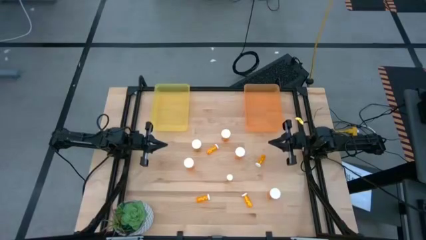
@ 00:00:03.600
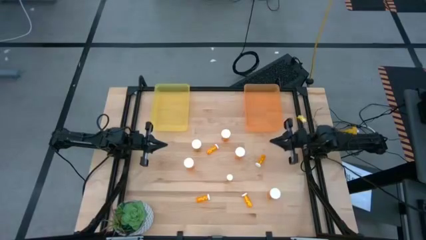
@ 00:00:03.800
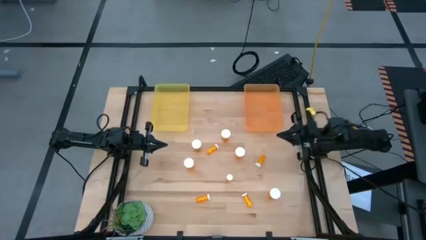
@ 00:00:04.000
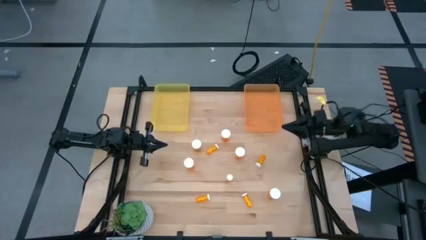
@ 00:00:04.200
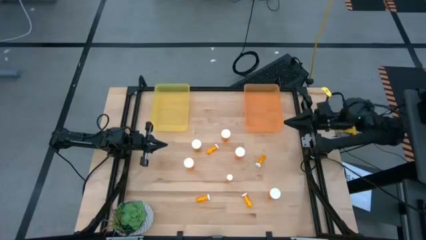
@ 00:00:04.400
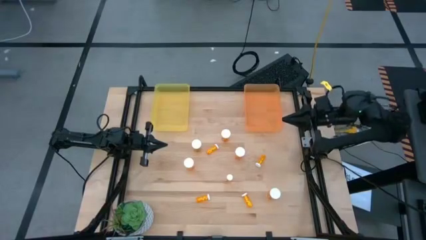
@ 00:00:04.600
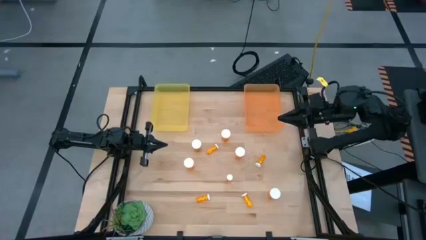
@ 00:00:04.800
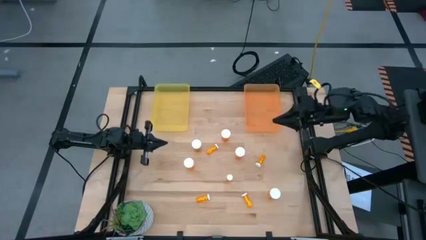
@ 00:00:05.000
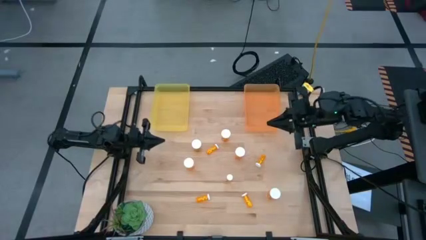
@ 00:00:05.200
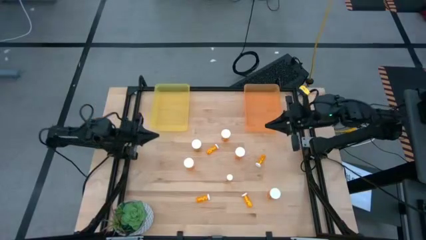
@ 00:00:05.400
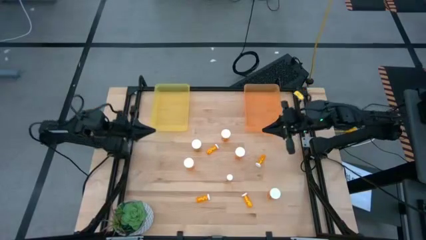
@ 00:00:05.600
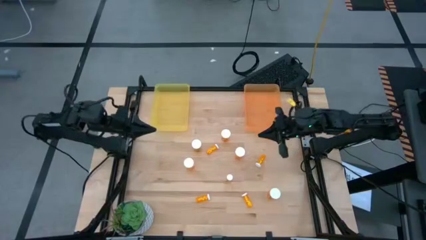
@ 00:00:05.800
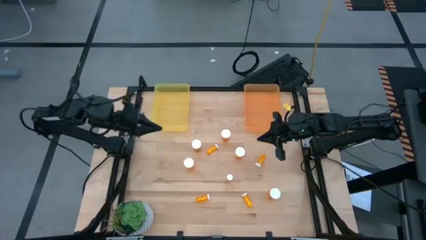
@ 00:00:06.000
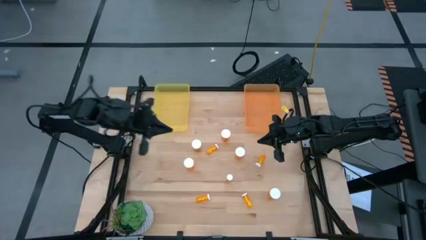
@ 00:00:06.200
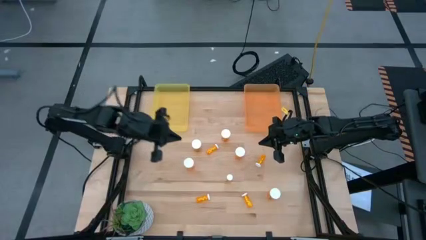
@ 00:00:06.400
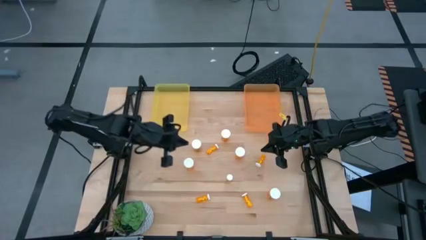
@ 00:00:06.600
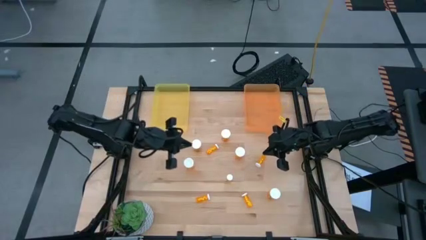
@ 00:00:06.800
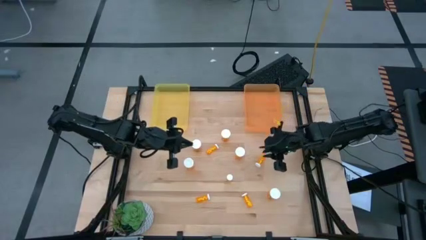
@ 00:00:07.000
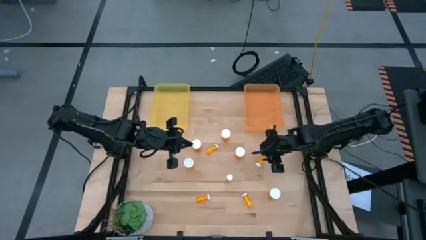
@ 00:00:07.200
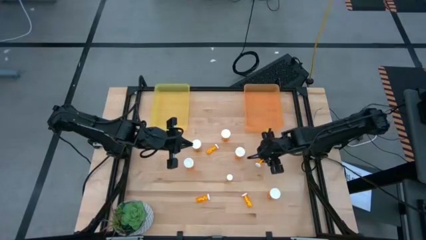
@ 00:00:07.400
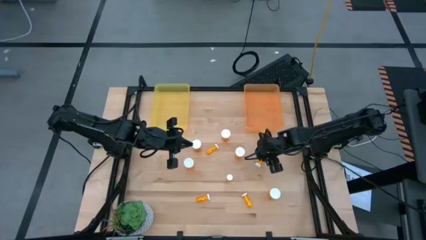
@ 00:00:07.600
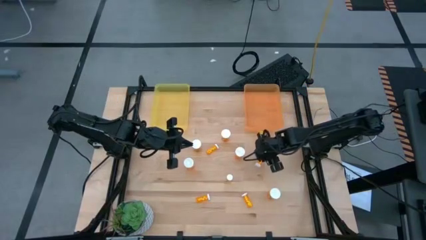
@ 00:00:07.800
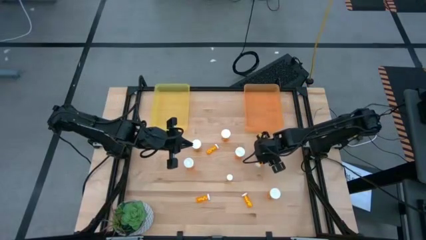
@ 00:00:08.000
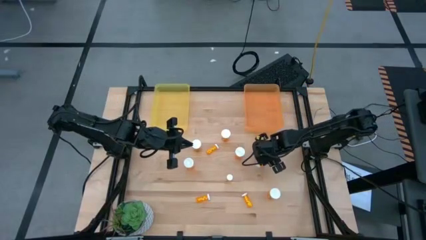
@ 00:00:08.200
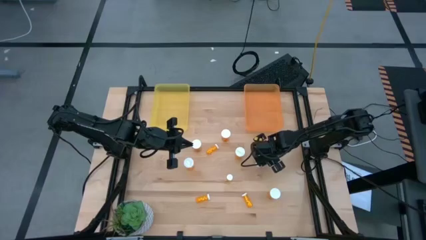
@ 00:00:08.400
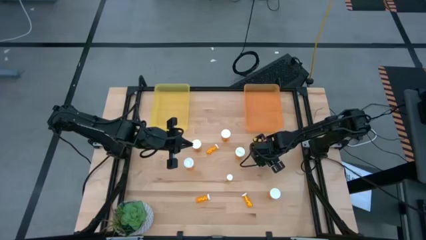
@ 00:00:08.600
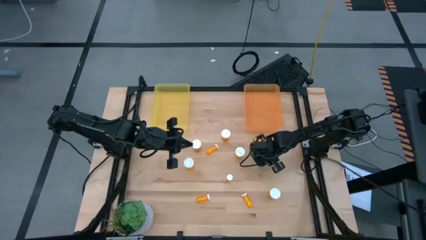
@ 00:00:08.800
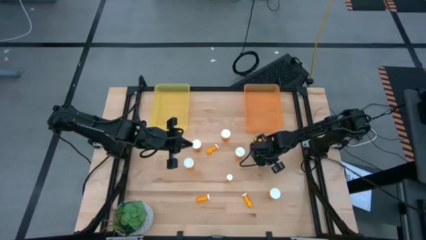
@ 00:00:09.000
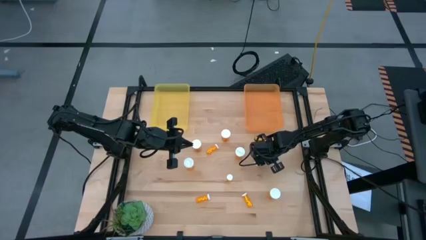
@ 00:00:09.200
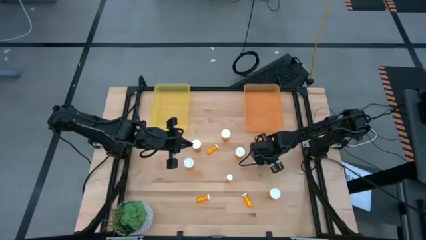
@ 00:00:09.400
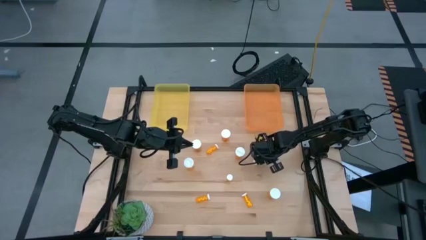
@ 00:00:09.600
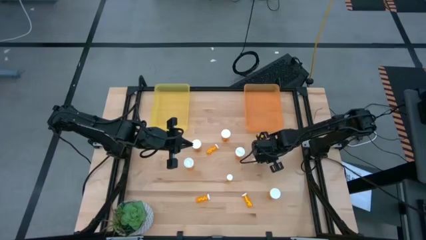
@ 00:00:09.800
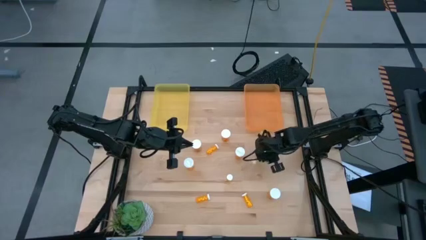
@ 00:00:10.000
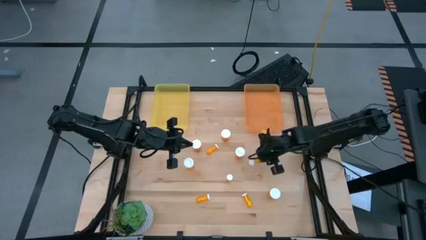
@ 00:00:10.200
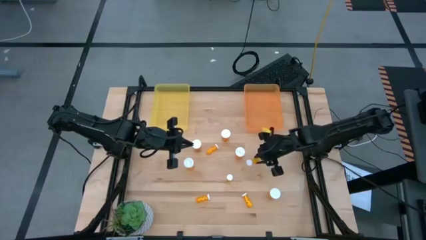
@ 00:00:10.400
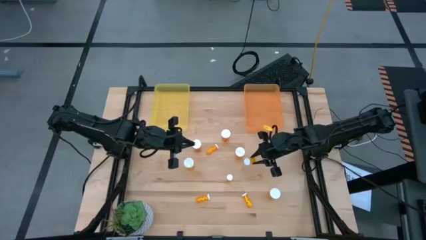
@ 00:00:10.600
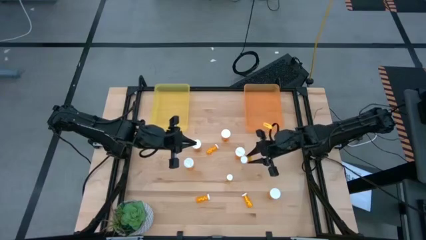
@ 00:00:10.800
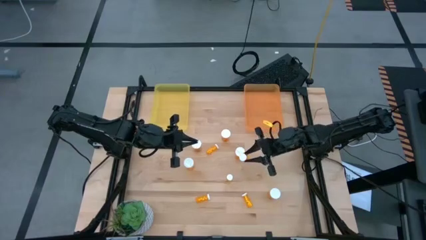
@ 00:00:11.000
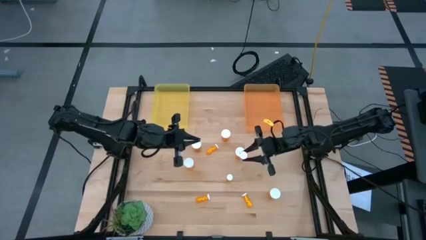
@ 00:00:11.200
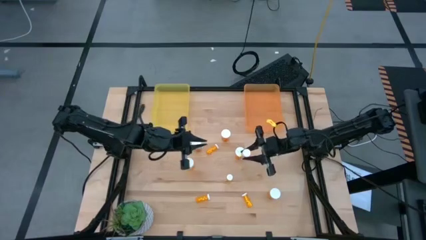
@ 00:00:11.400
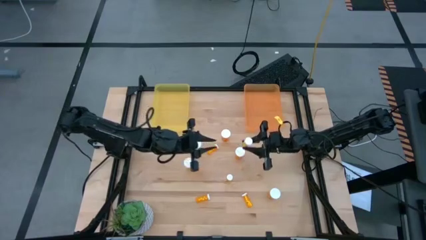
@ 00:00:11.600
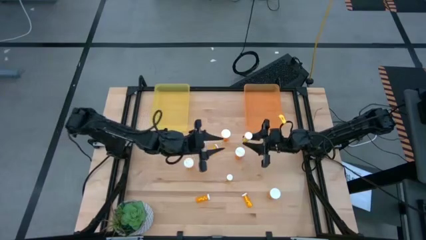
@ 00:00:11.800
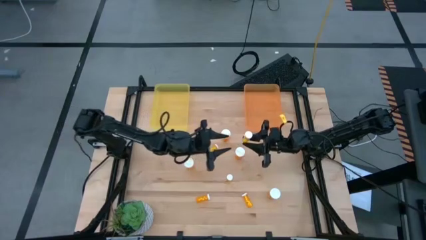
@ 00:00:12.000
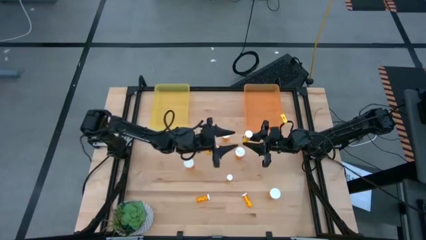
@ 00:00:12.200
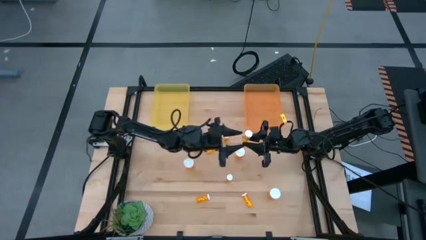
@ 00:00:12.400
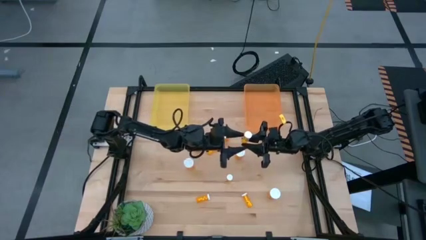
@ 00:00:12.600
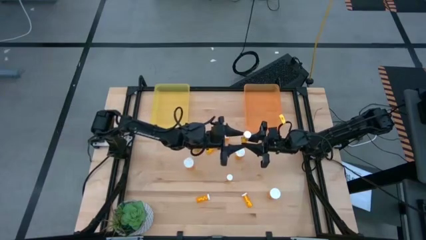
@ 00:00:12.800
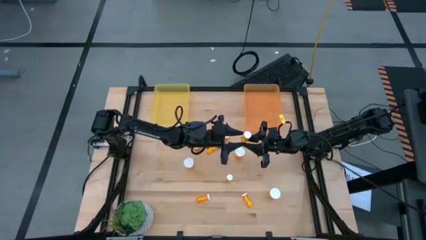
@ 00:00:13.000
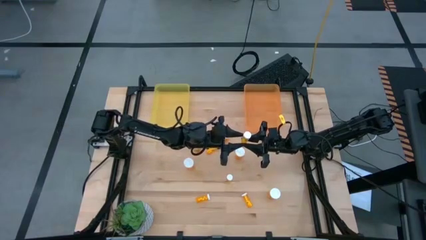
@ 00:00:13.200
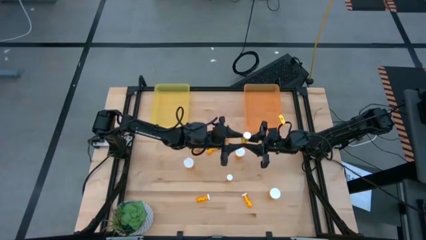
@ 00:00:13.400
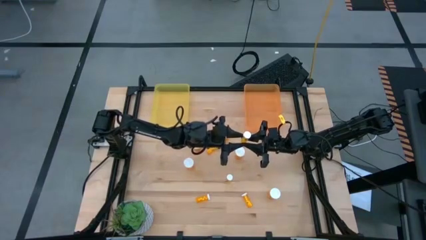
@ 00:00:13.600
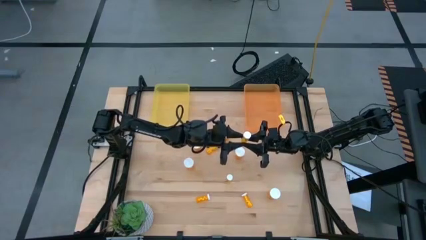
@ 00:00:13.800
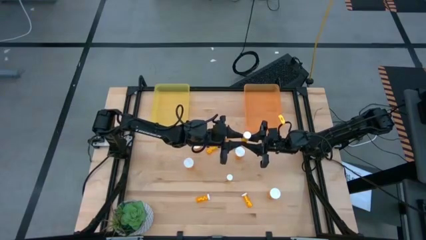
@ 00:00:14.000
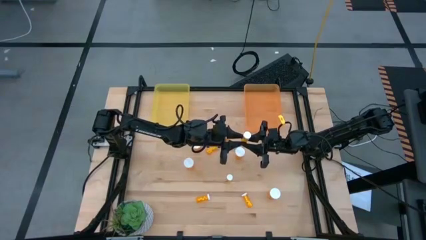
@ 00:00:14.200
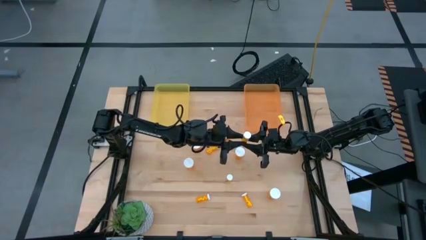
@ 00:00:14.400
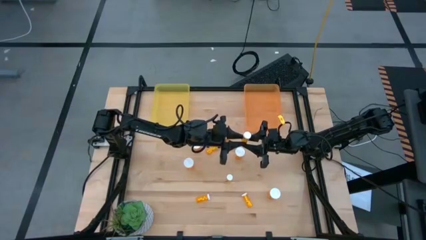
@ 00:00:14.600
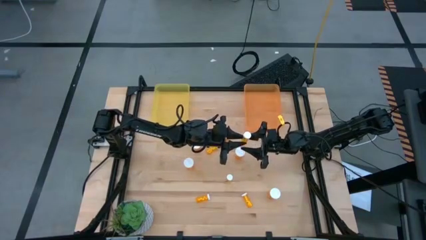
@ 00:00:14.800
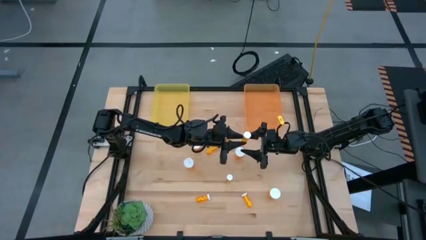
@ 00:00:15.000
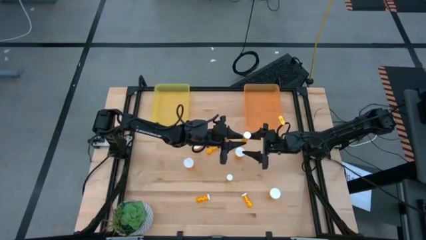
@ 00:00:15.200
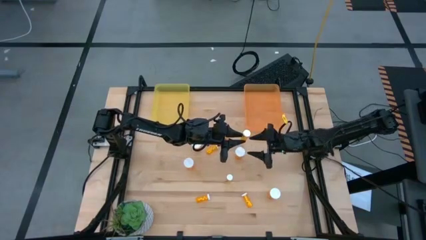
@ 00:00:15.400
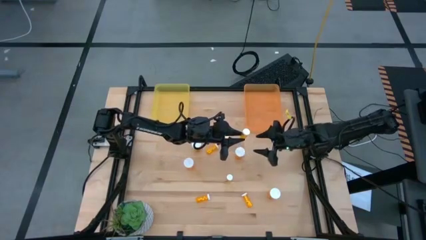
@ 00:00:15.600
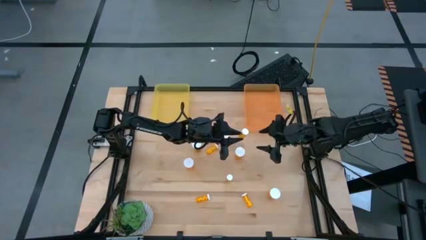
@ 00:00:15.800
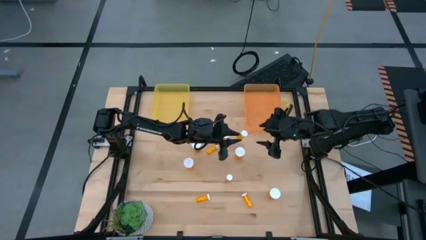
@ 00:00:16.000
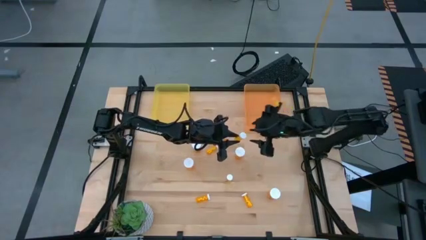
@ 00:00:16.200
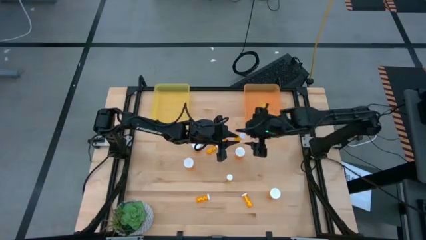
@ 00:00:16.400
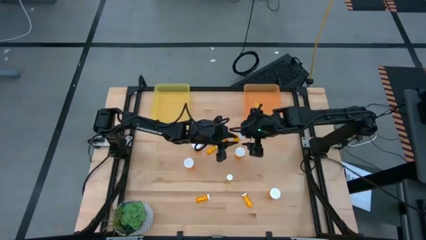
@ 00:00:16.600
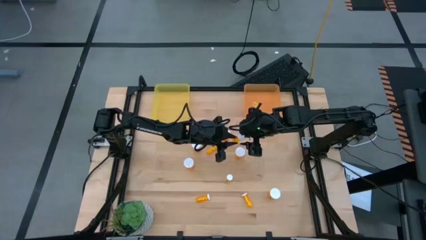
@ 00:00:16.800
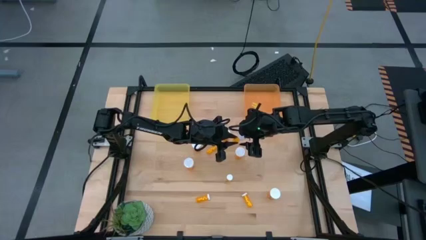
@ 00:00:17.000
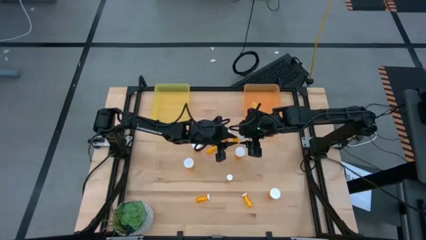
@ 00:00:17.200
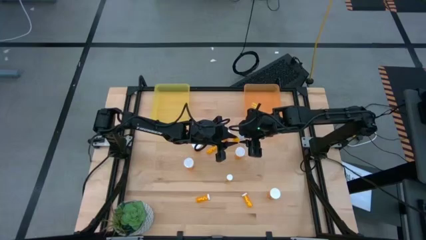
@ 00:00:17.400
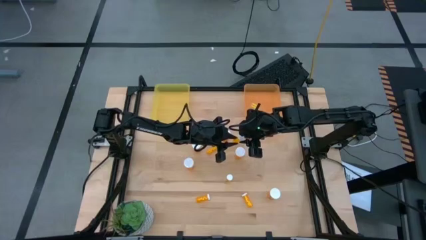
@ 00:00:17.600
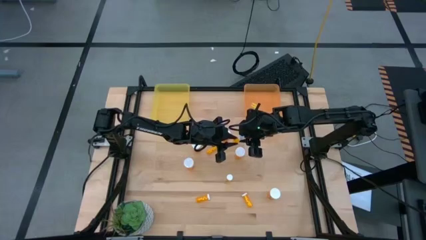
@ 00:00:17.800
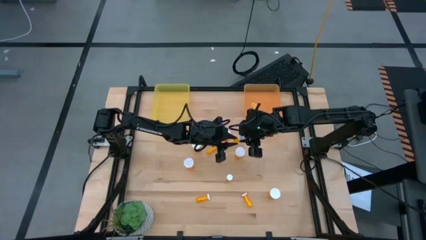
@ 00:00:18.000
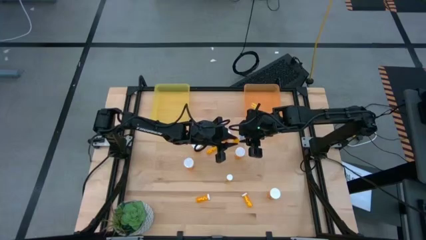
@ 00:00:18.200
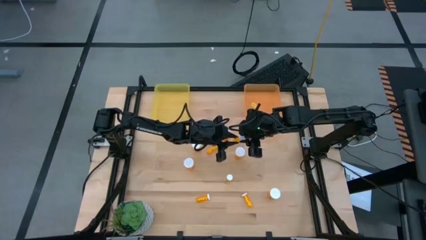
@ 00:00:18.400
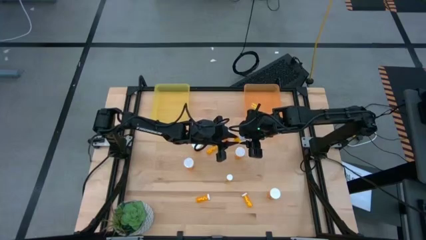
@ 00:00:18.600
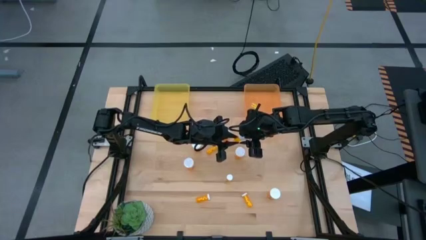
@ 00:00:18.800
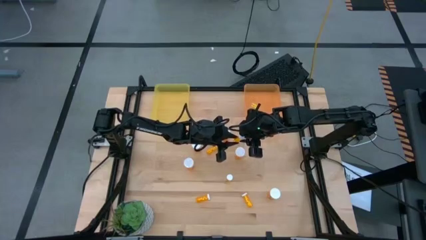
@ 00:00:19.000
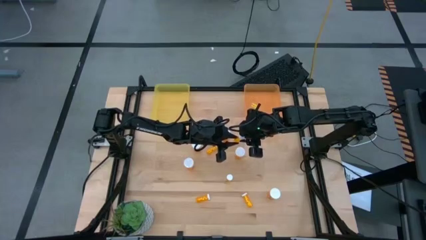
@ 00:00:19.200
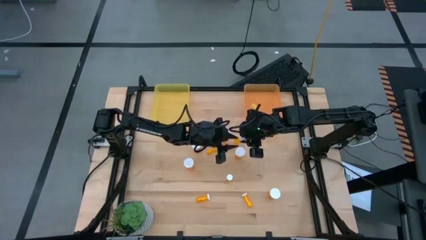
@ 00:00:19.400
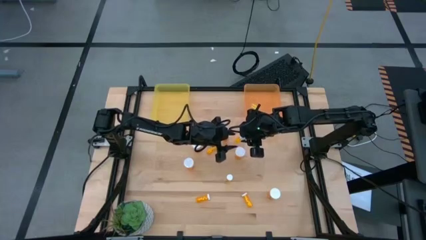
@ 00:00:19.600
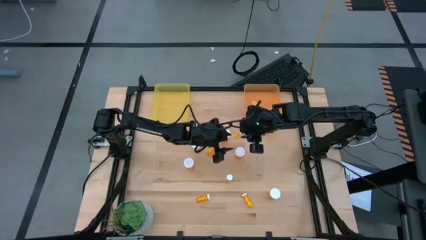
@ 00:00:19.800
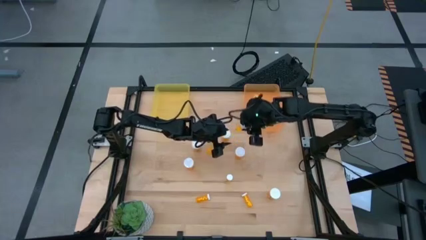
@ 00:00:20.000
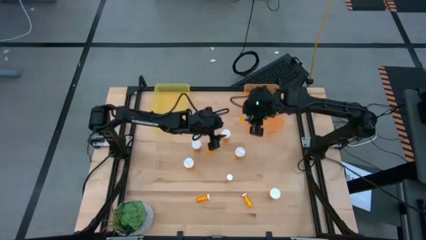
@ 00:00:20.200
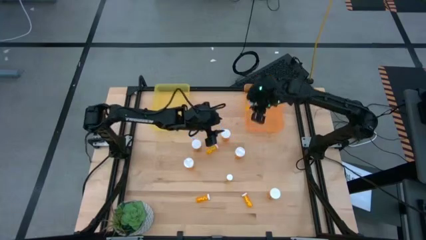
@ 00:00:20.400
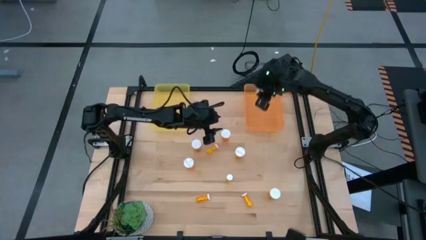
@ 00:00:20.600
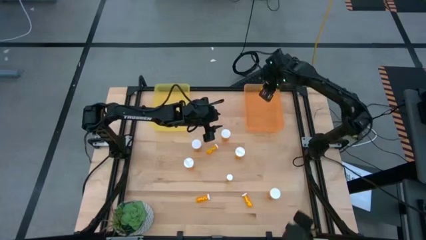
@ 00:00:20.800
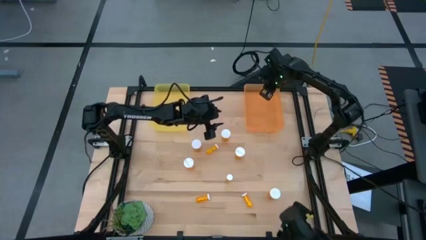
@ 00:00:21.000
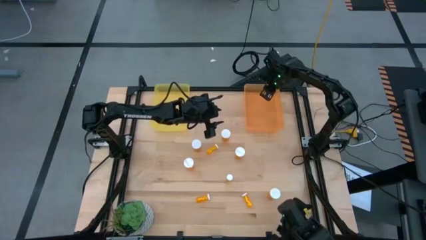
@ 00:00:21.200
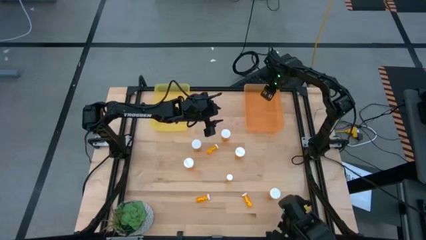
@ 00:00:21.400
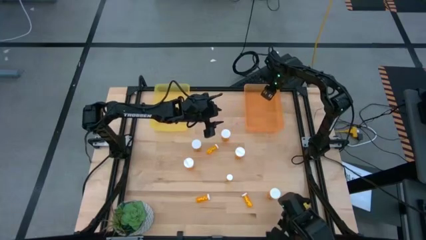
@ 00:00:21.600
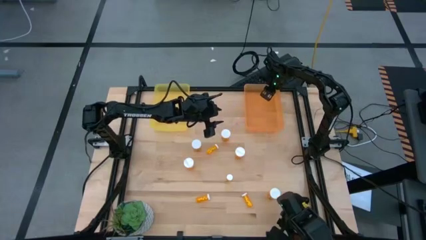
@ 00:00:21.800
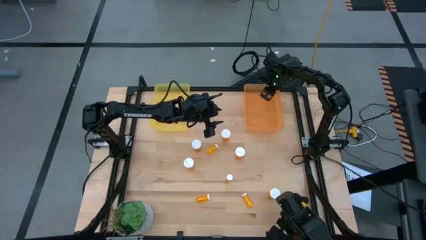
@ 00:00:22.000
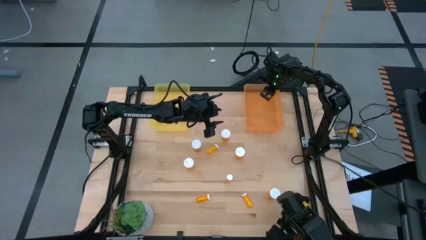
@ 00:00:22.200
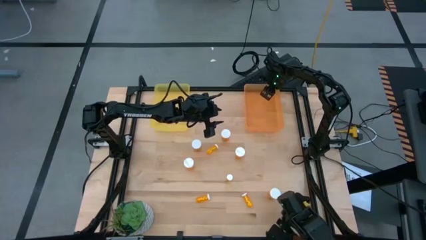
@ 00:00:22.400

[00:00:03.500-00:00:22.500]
Task: Pick and place medicine bottles into bin by pill shape (circle, oval)
Put the small orange pill bottle into the orange bin
